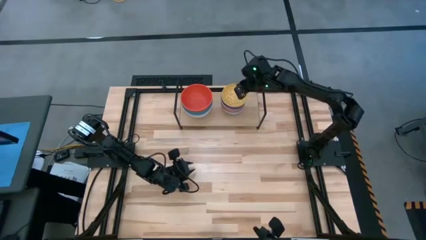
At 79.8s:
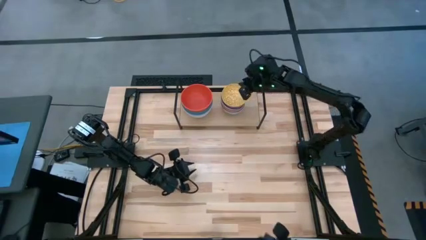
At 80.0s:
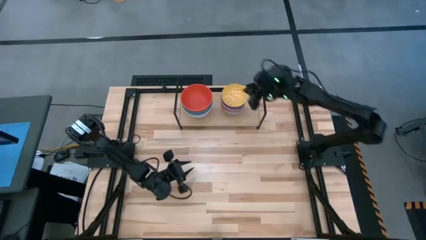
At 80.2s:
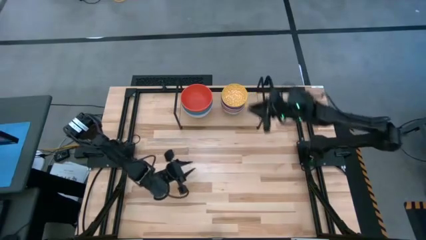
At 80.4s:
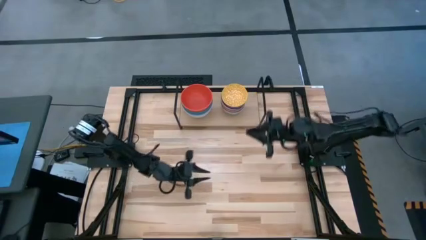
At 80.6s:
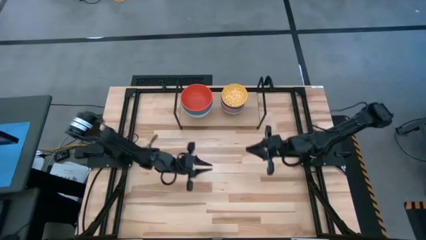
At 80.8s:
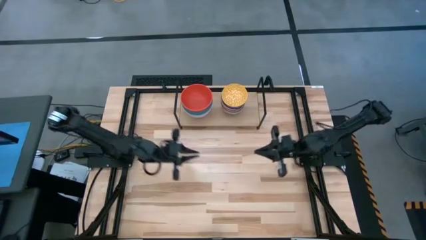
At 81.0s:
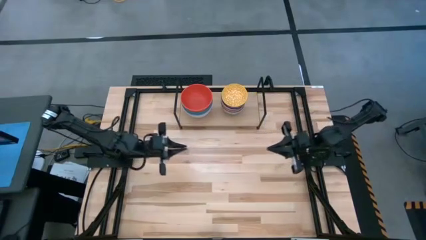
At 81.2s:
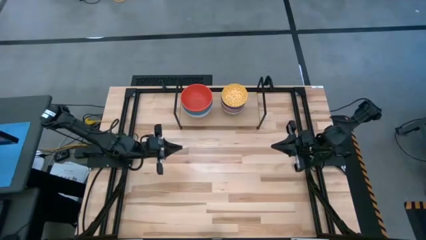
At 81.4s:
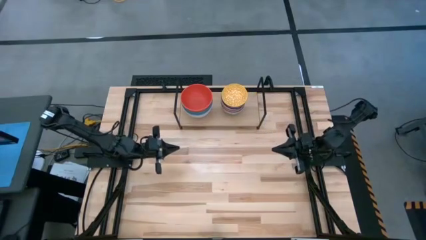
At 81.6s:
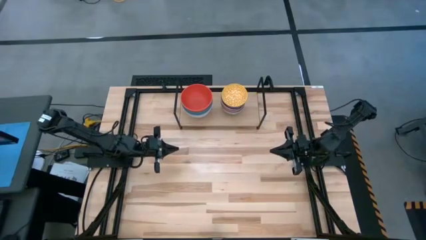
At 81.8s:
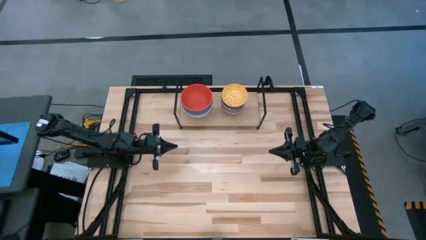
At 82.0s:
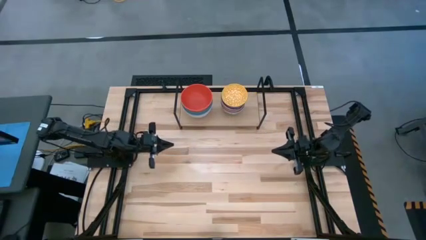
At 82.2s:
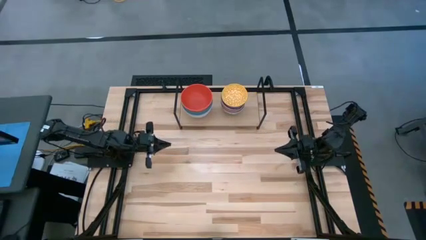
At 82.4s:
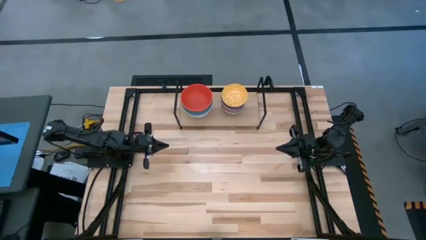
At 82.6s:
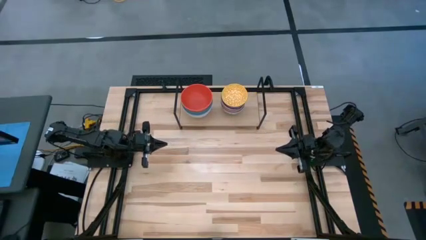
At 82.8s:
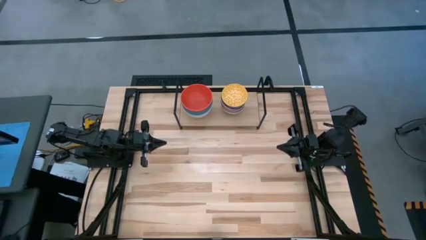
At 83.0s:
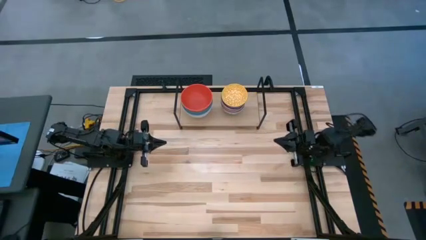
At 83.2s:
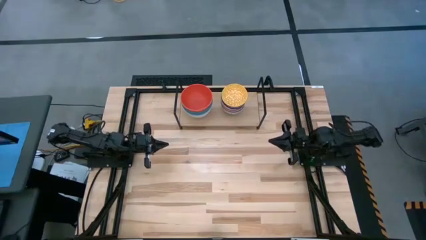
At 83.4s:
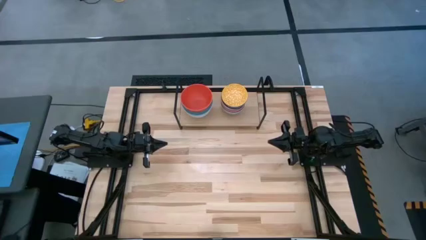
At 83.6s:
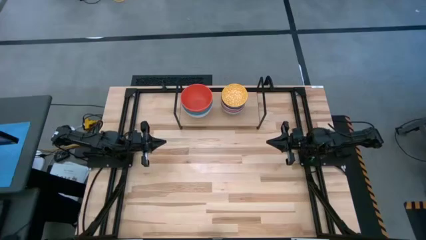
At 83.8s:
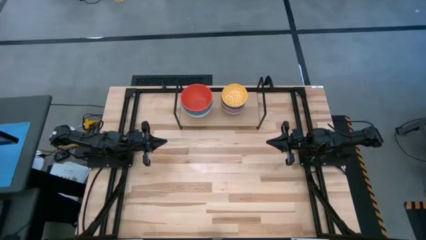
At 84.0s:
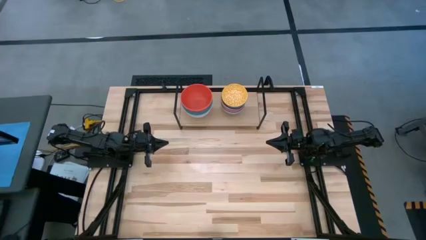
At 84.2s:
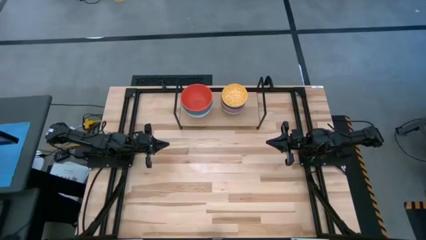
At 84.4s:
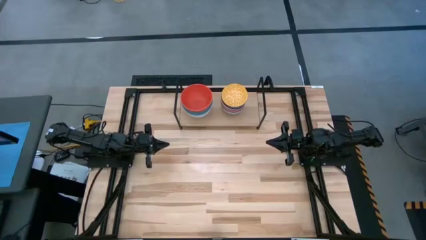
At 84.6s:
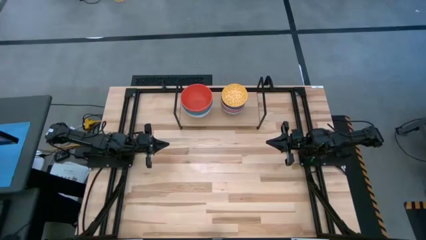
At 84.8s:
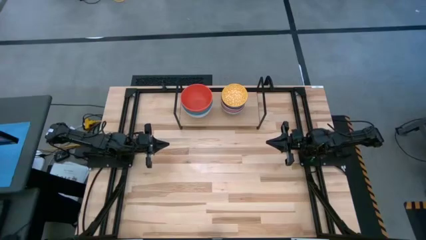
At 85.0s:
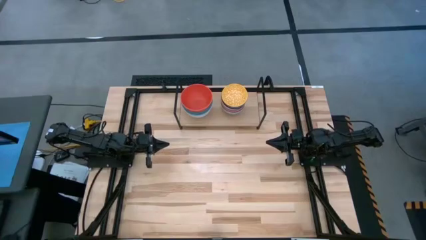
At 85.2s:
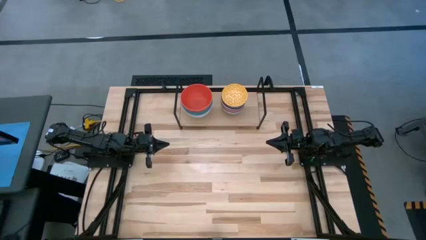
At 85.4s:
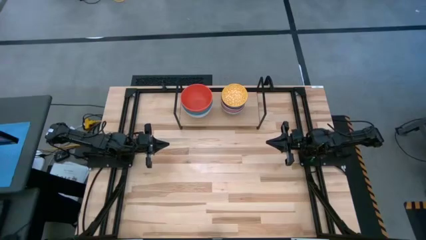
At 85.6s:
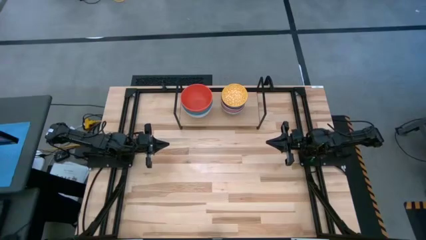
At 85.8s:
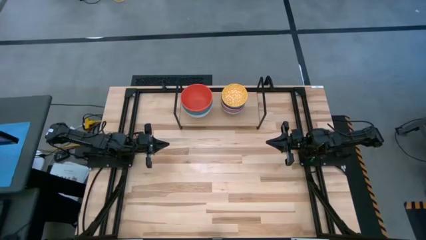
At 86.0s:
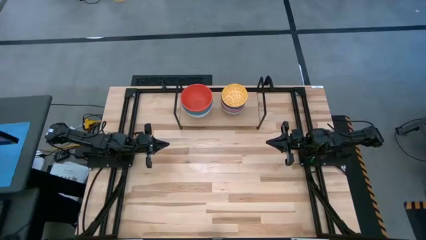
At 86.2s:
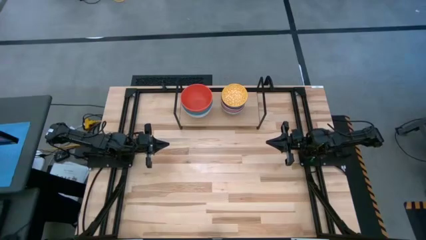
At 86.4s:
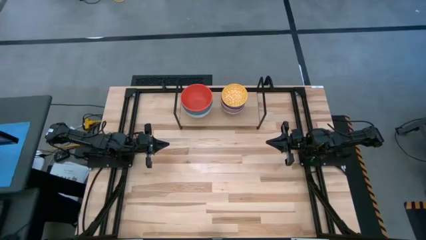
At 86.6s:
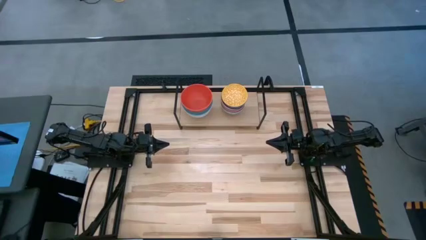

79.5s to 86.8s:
Task: Place and stack bowls onto a shelf
Return to Home Position

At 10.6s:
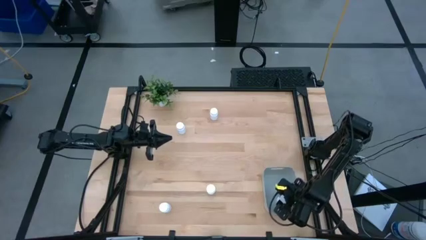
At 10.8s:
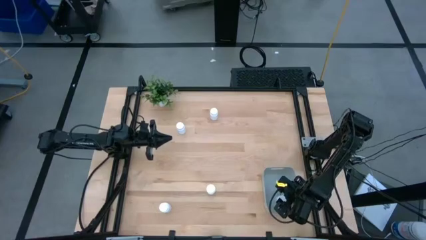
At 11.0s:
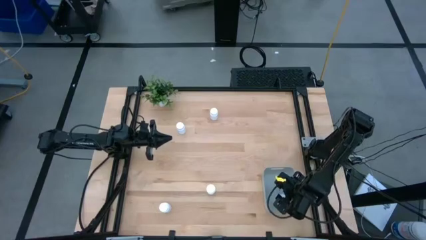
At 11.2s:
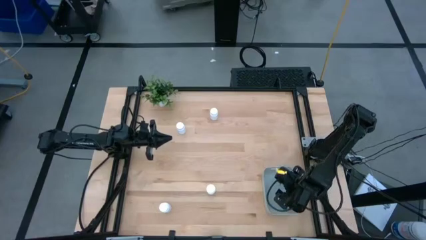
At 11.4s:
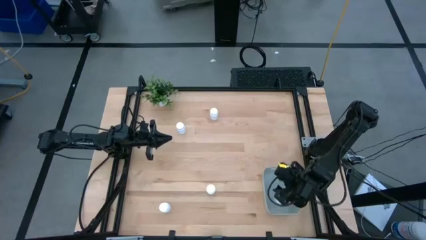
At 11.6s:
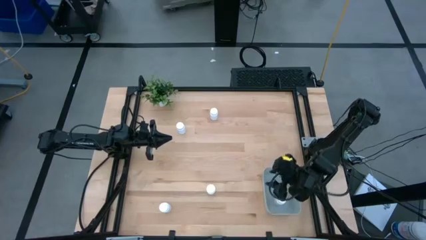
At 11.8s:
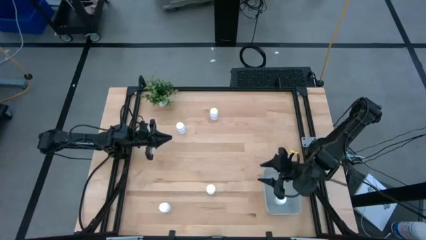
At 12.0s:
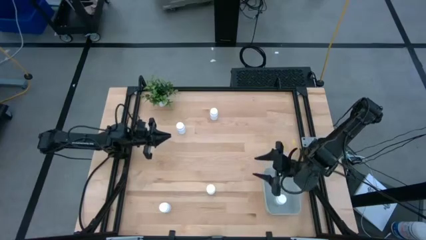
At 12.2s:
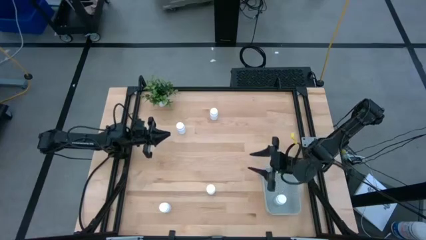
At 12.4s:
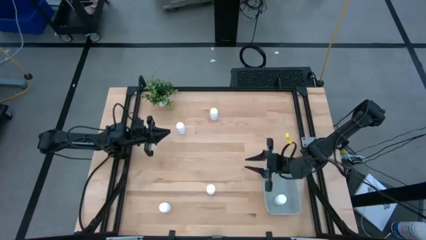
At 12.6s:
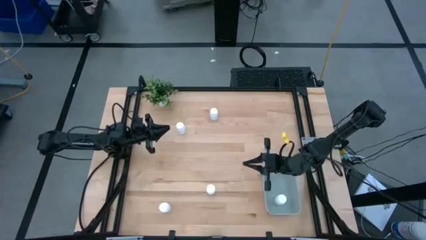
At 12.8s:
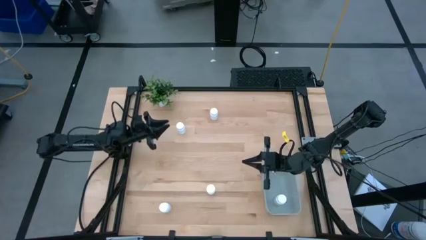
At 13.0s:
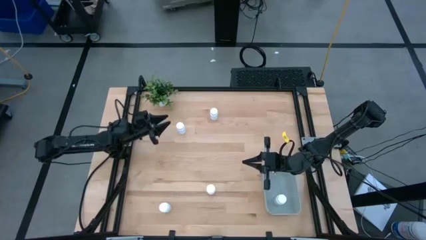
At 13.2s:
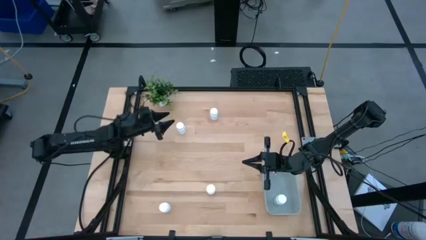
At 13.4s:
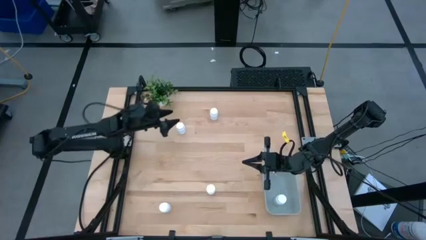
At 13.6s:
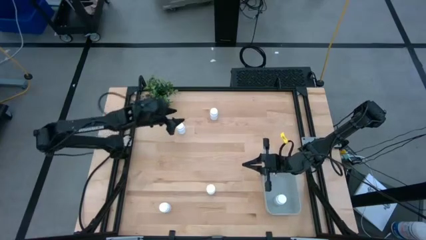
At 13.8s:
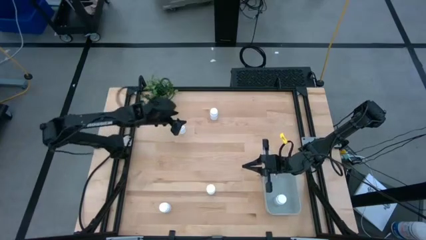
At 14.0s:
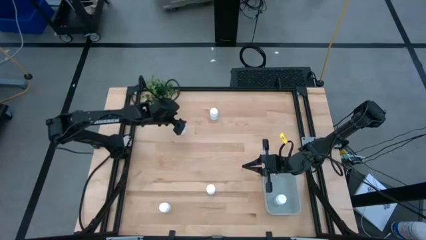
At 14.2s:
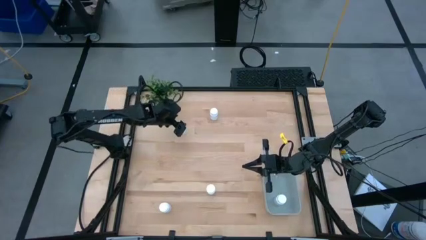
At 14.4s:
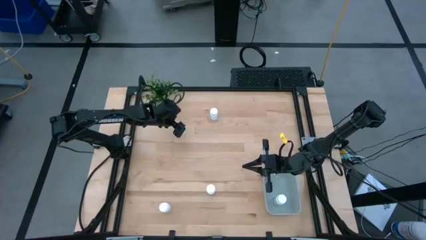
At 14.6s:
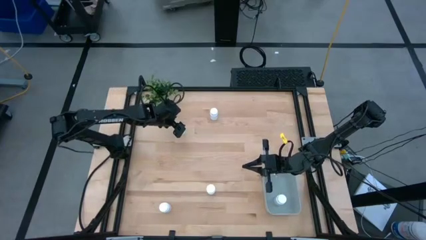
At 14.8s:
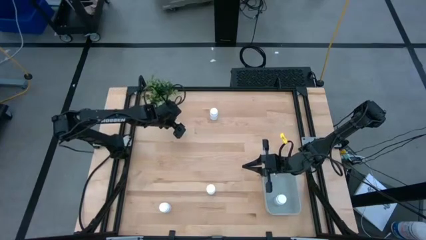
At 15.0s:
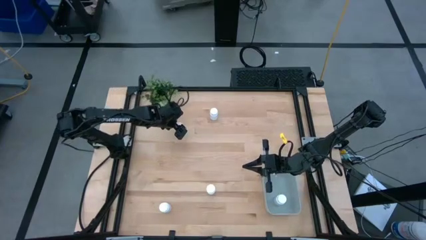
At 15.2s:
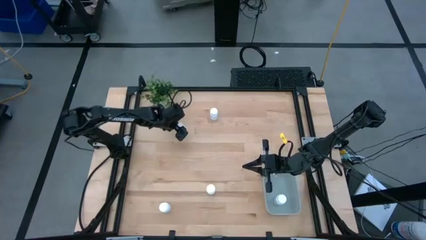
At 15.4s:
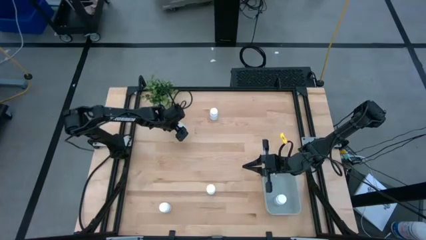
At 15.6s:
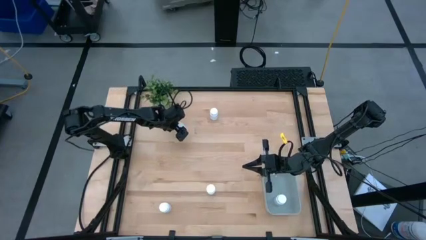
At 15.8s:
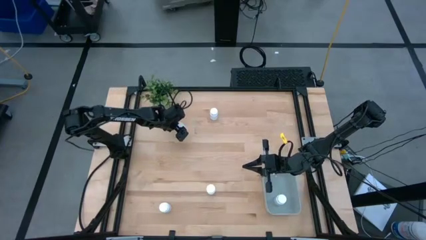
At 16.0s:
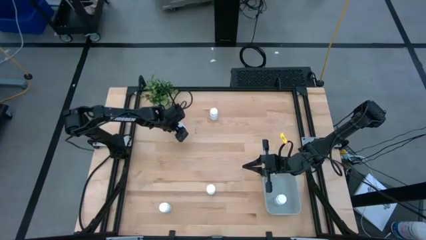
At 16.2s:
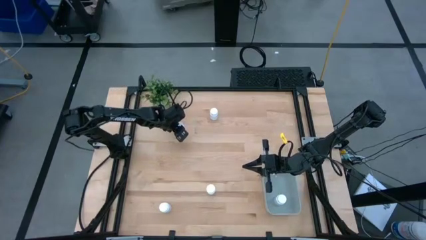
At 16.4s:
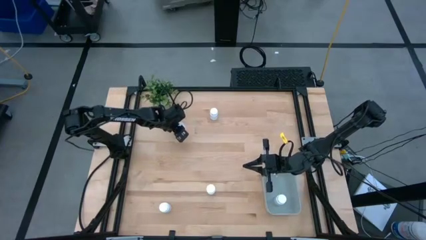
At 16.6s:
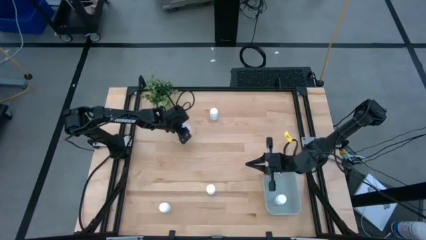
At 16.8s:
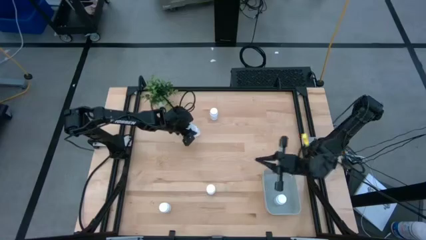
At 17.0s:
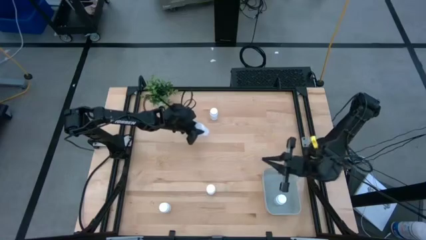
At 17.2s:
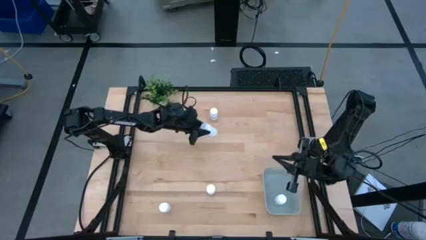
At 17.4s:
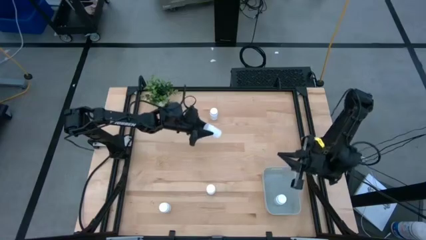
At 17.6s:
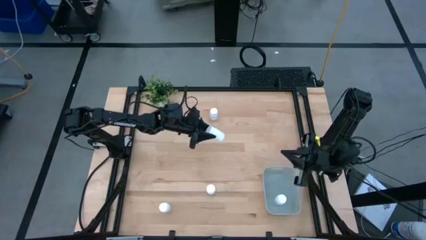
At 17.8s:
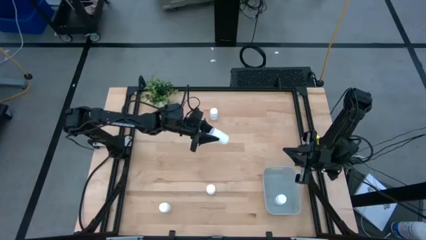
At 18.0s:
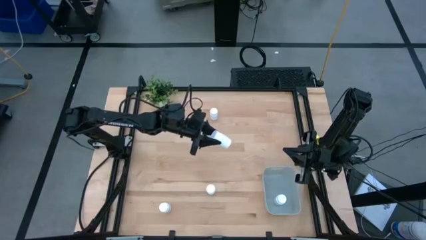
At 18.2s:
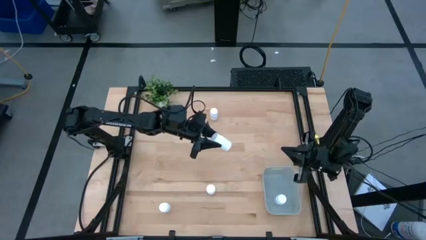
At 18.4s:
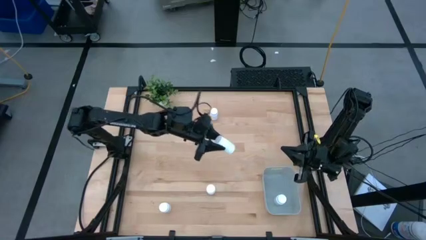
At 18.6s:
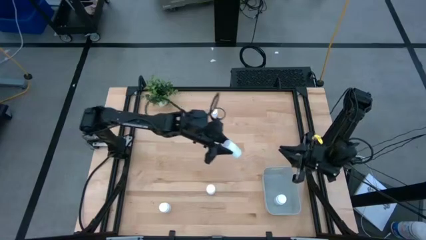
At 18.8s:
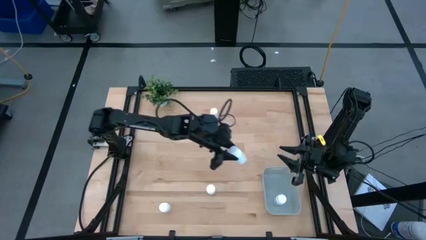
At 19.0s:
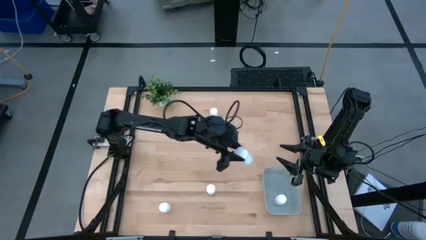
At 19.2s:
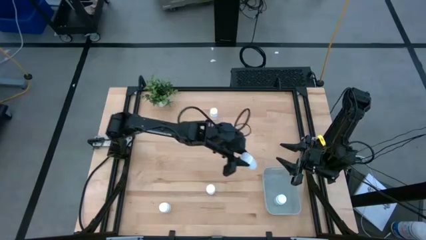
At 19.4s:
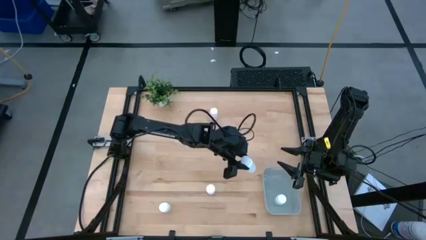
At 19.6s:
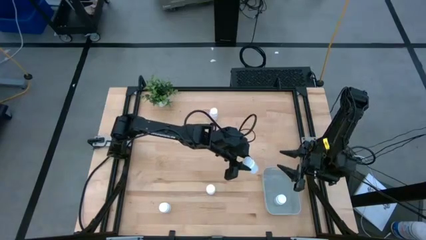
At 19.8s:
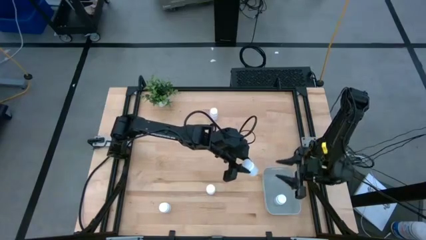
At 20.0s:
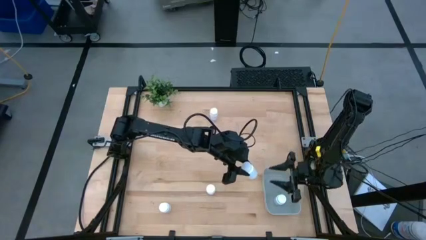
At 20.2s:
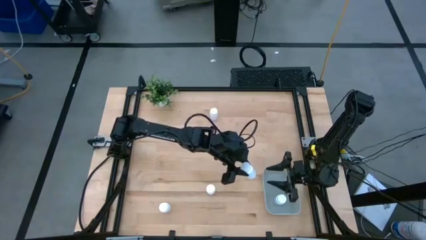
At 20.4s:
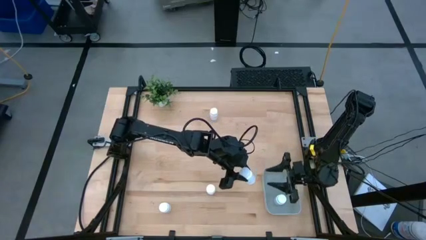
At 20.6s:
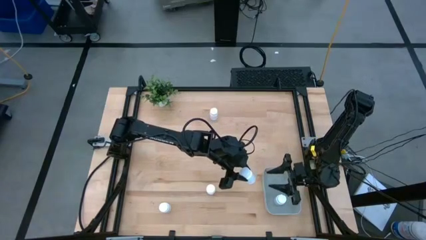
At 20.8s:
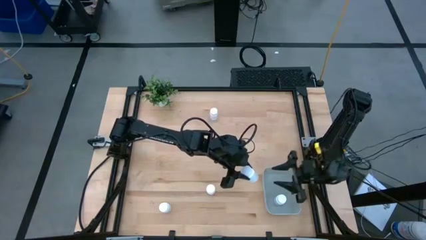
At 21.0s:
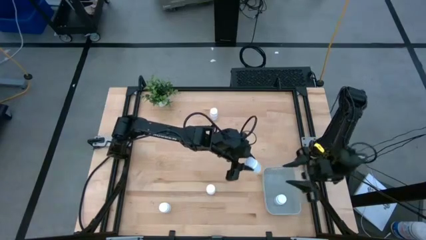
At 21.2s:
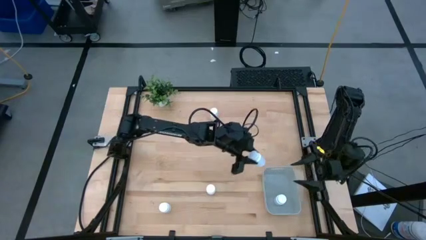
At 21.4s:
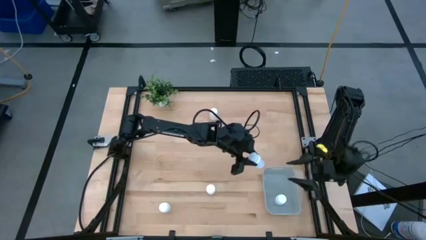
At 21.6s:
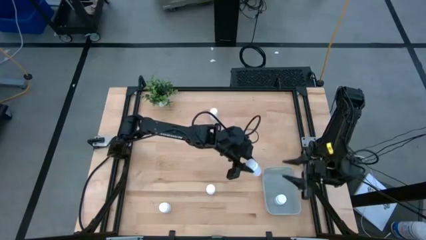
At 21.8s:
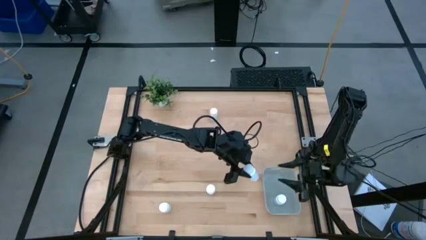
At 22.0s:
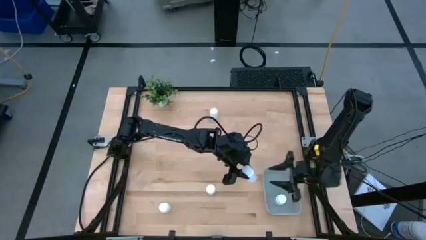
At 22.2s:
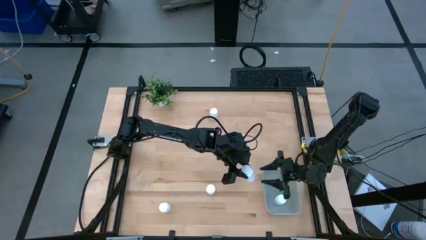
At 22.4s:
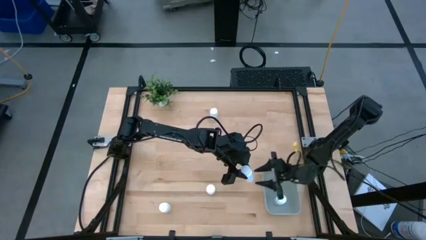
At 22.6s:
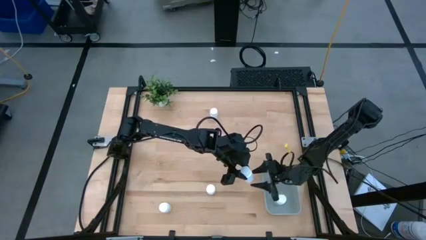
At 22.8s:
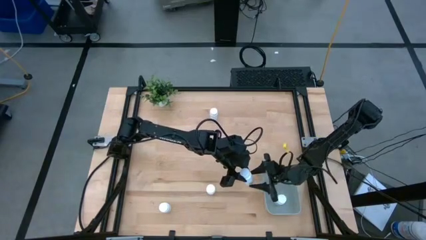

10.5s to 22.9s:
Task: Pick and place pill bottles into a basket
Put the white pill bottle into the gray bin
